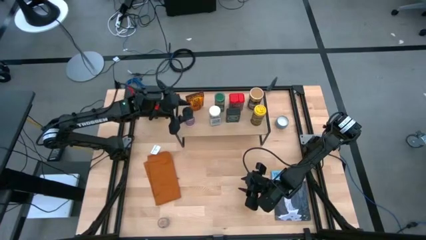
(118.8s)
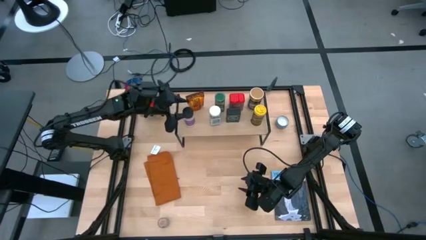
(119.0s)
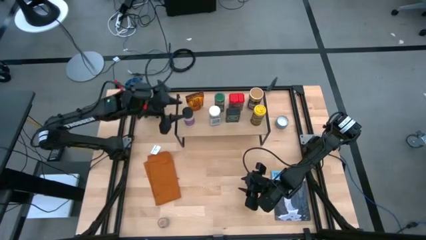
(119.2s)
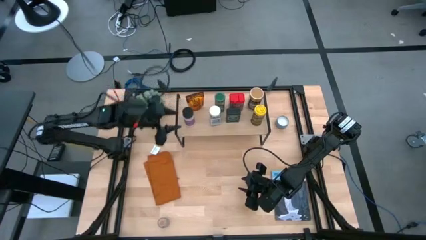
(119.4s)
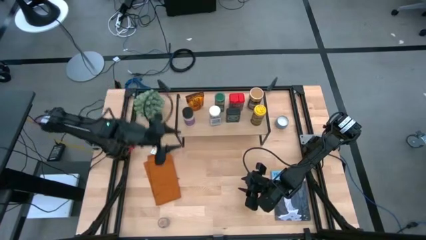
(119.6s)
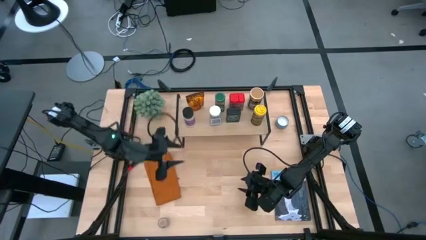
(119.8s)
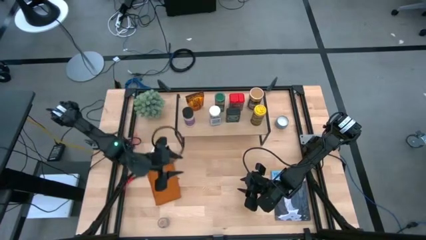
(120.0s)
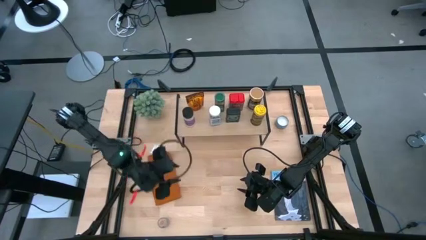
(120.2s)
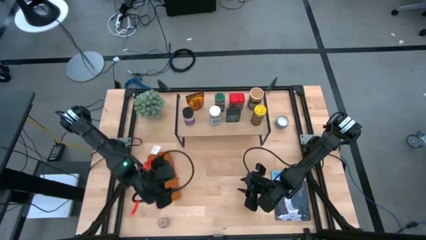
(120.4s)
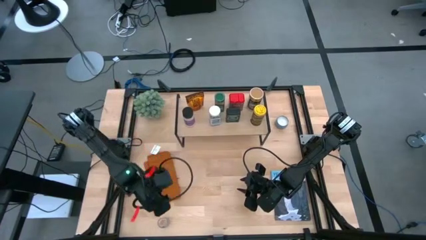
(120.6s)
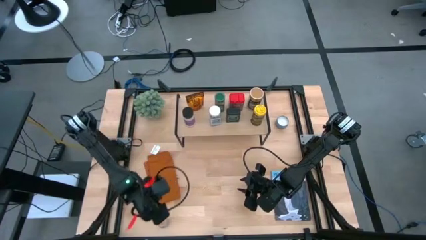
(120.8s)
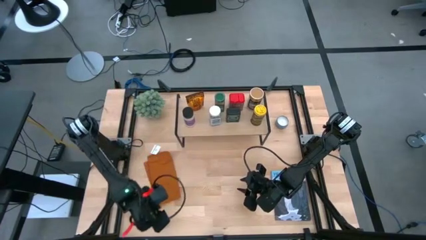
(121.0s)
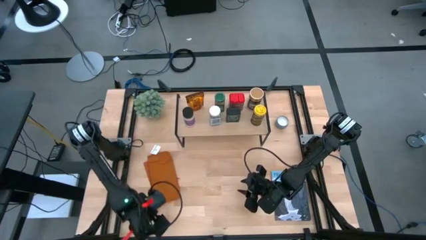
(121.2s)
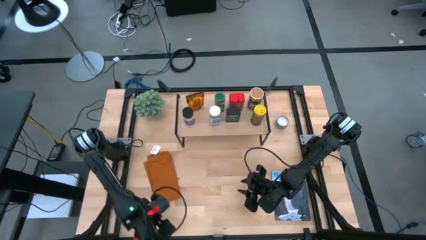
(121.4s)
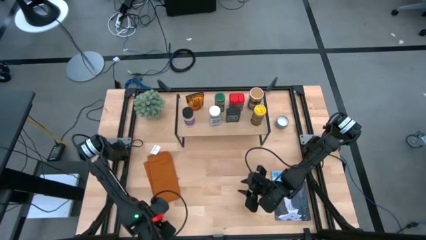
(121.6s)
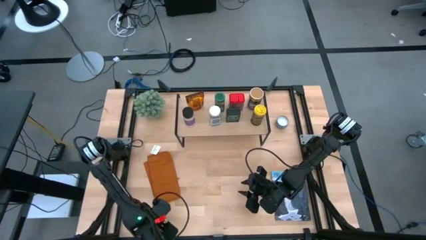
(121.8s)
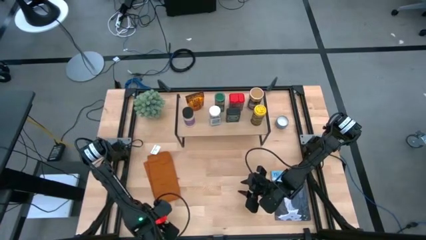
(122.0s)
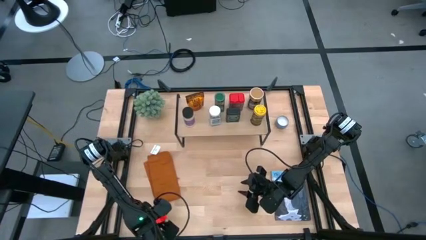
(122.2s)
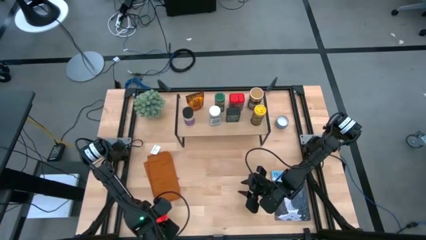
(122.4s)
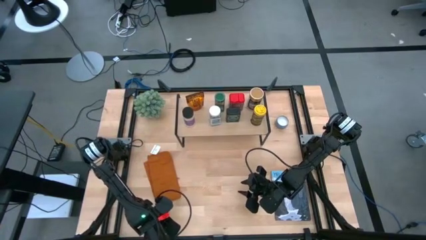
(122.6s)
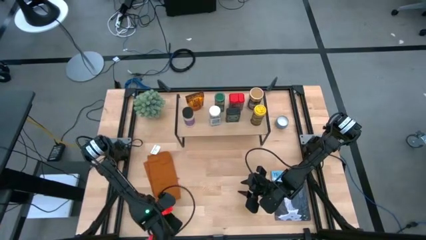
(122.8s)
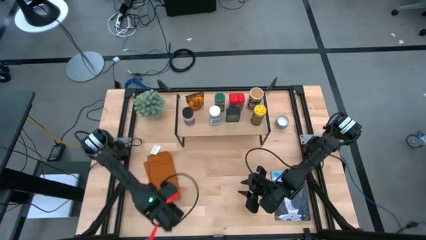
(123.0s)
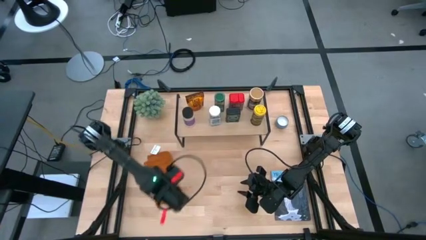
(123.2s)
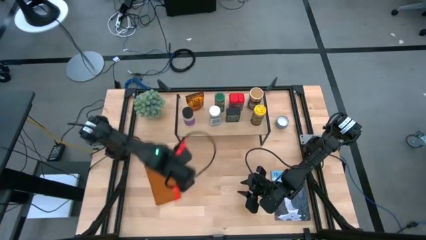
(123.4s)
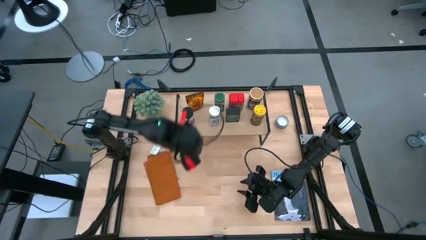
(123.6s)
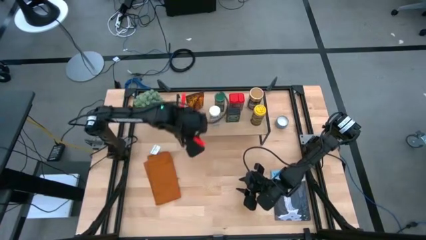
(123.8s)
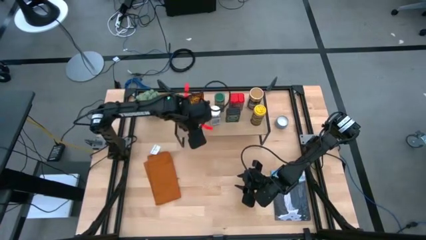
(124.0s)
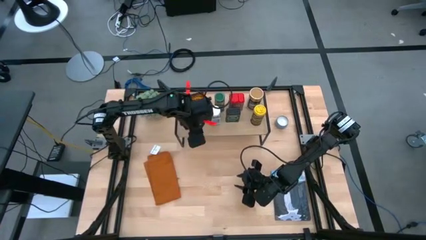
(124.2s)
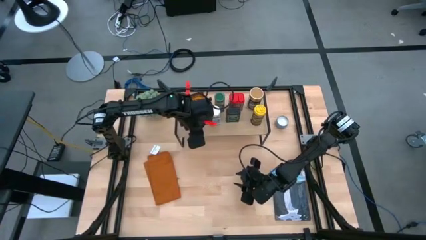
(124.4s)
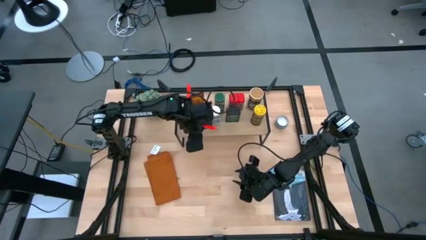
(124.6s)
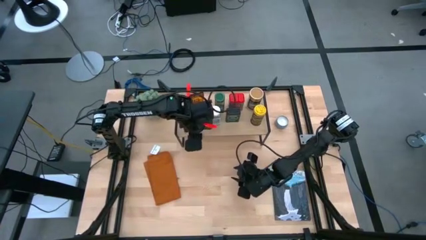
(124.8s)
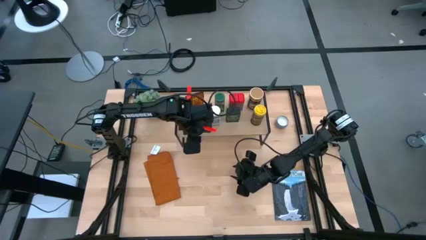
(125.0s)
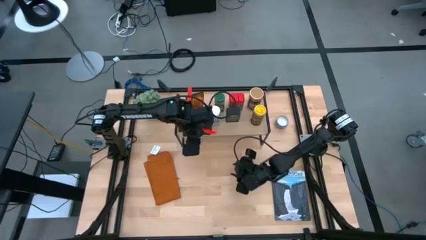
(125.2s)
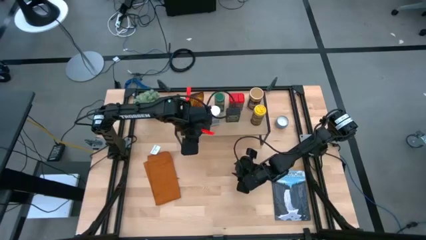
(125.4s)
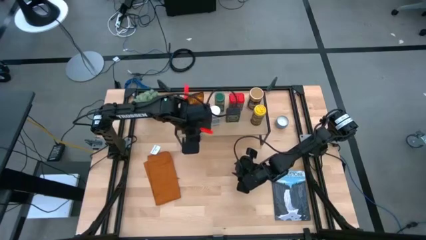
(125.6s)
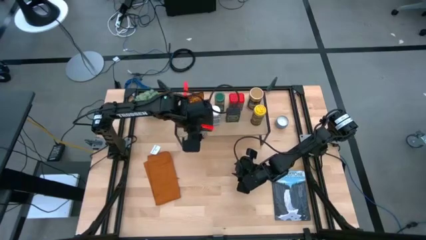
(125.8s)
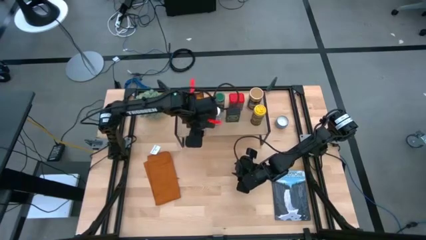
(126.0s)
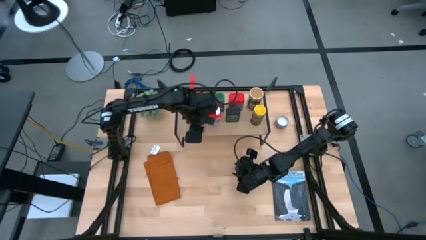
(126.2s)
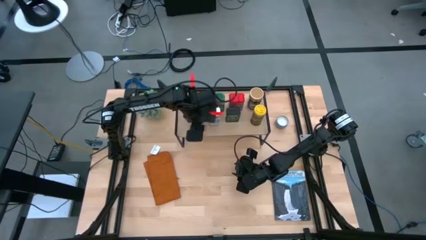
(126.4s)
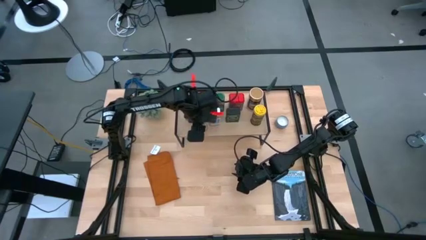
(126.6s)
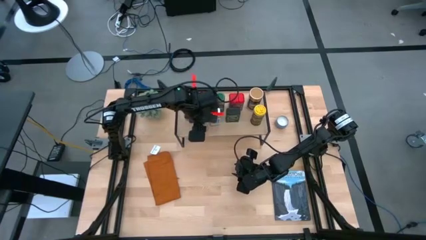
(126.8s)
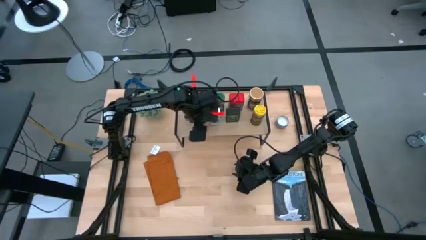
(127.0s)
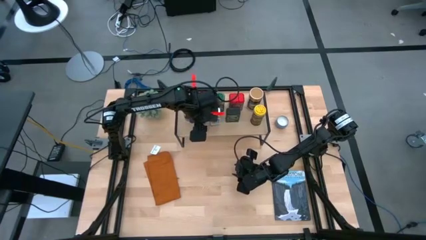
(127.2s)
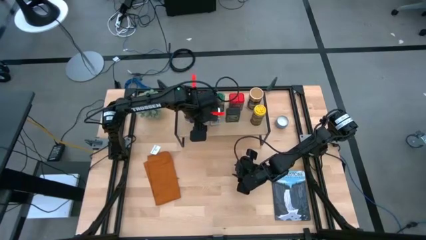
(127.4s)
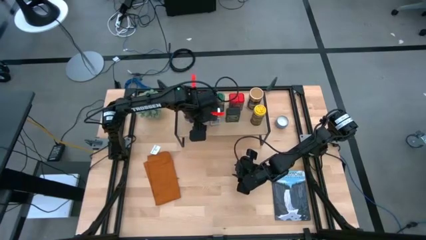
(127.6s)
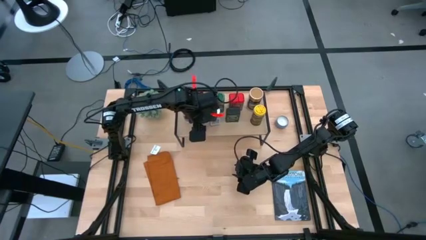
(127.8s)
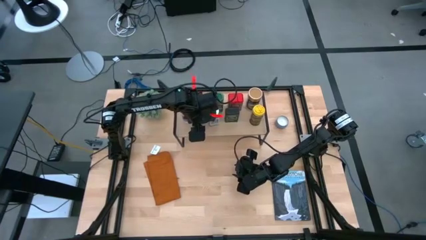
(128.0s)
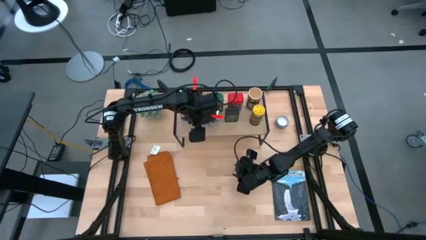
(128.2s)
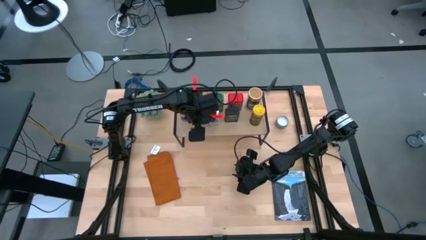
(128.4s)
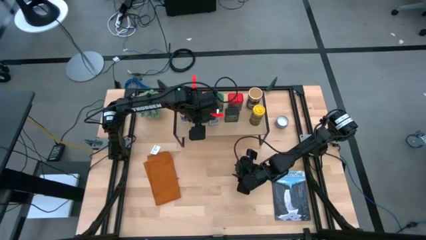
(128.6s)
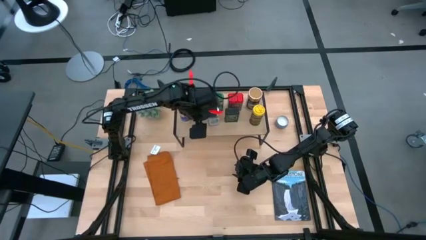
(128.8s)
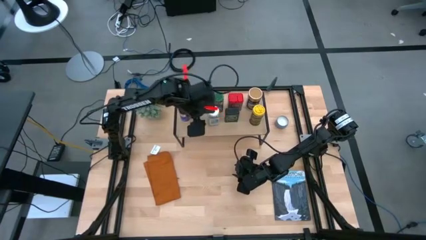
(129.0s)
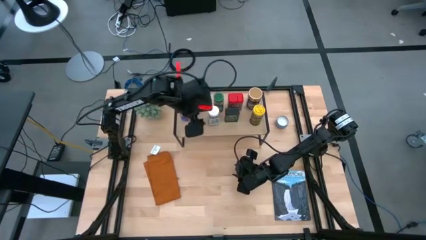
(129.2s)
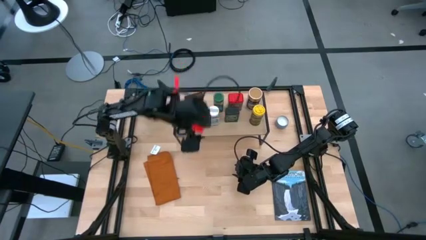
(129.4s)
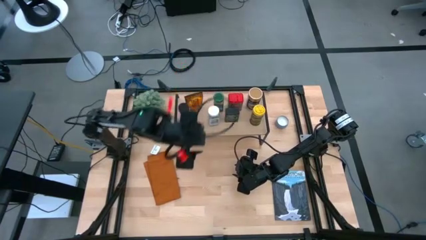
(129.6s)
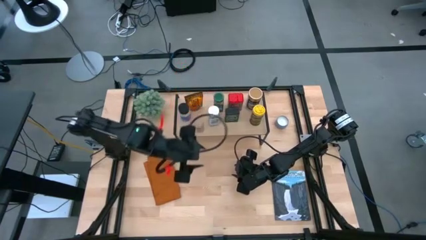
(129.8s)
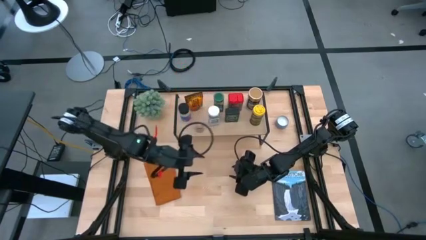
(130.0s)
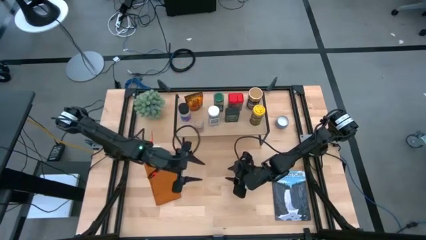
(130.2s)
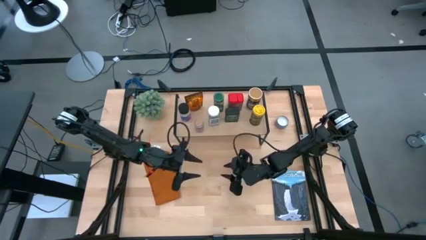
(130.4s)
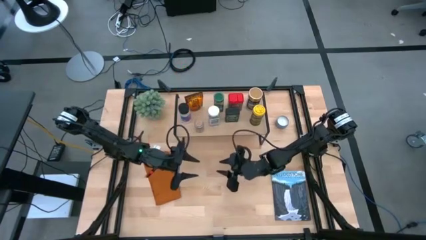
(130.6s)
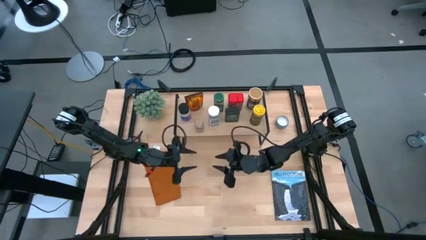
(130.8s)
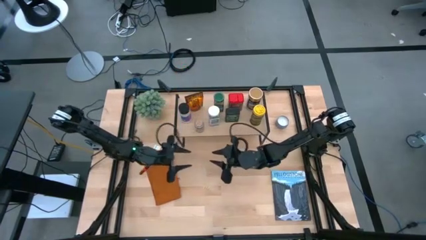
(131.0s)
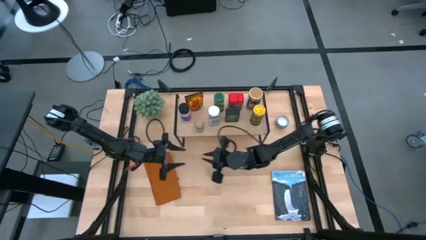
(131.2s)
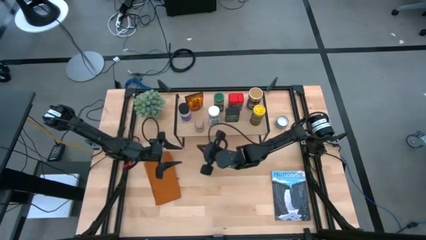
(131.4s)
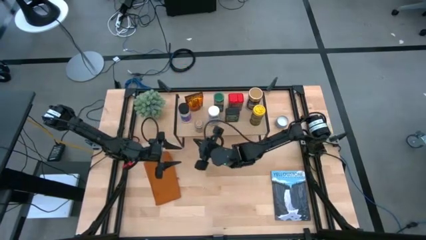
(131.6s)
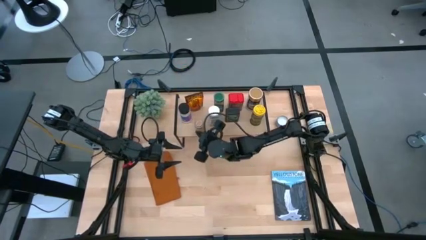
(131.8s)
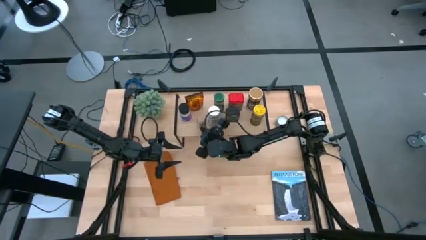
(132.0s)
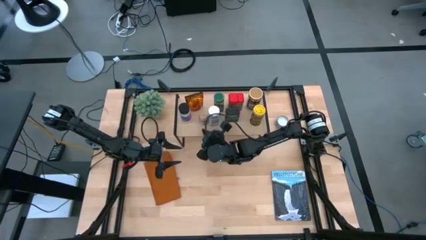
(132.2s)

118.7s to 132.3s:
Task: Shelf spices
Put the brown seasoning bottle on the shelf

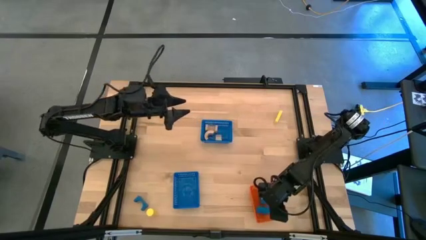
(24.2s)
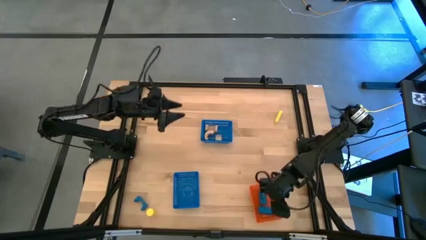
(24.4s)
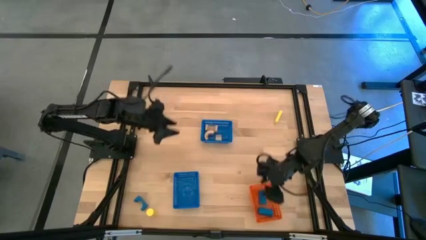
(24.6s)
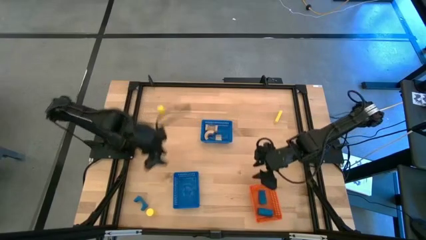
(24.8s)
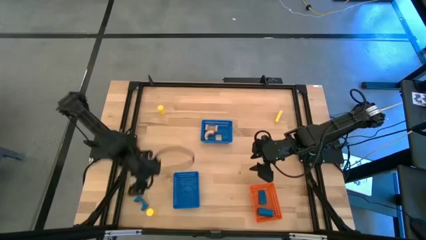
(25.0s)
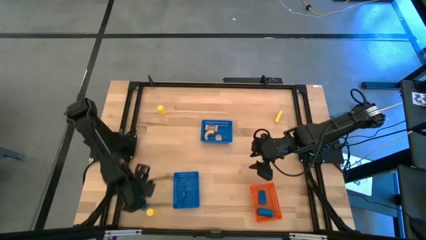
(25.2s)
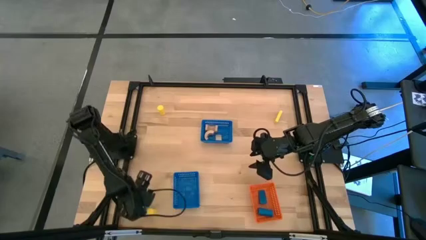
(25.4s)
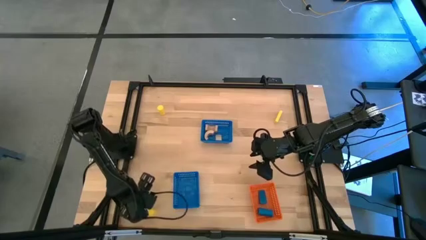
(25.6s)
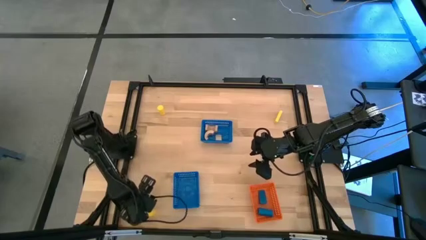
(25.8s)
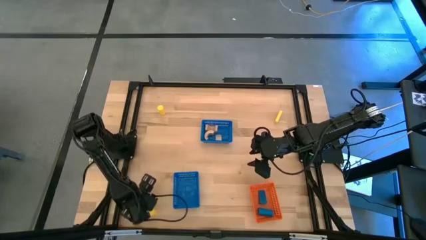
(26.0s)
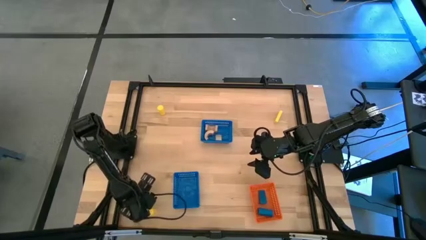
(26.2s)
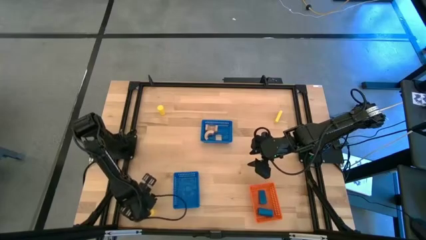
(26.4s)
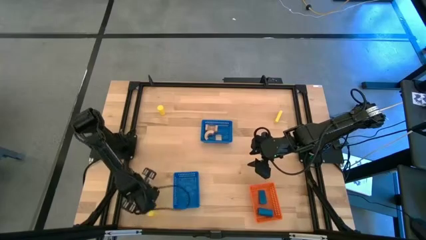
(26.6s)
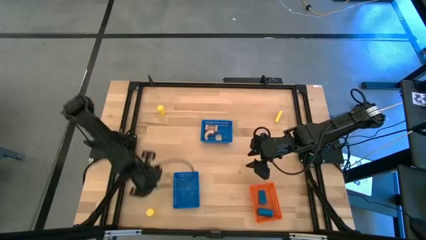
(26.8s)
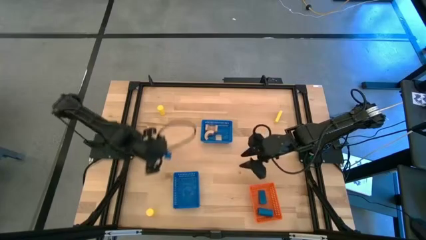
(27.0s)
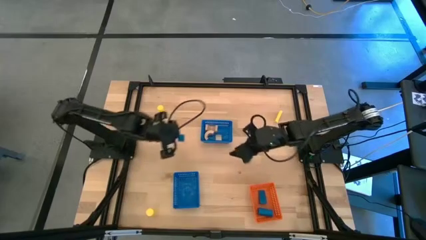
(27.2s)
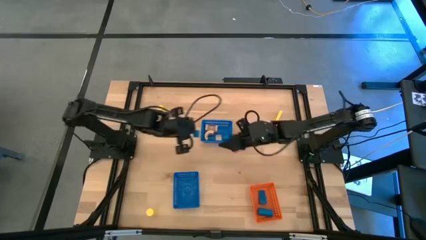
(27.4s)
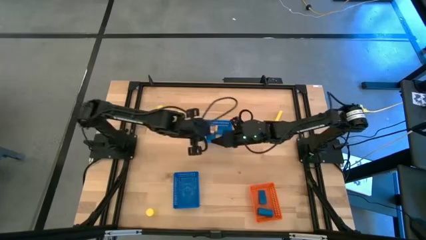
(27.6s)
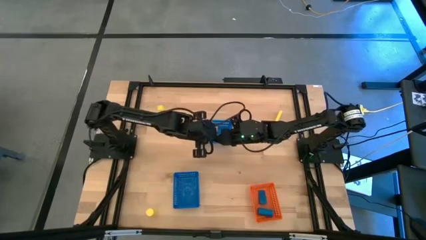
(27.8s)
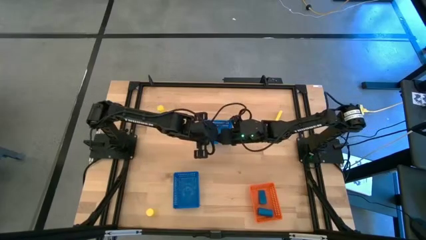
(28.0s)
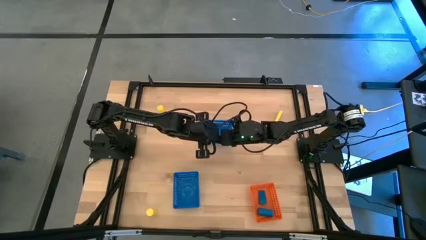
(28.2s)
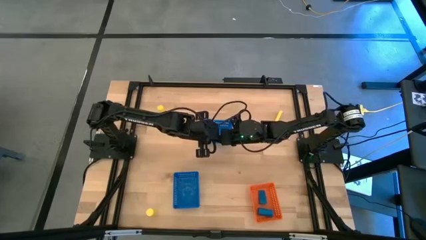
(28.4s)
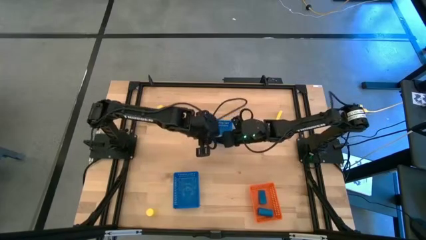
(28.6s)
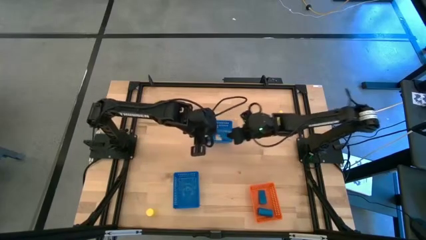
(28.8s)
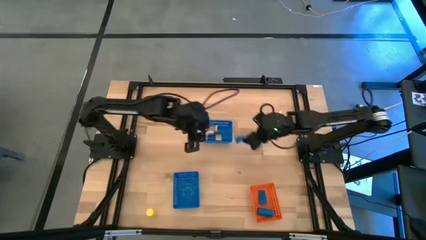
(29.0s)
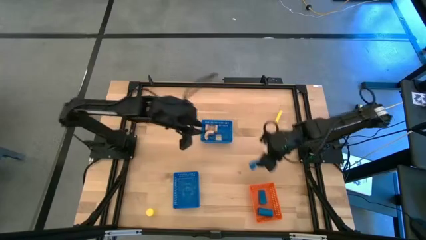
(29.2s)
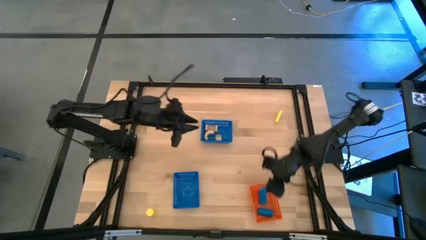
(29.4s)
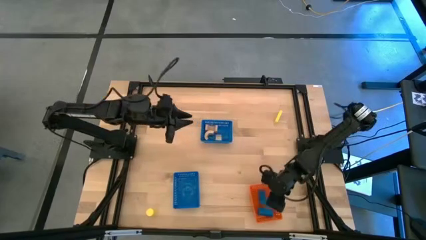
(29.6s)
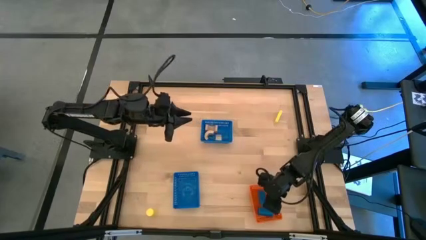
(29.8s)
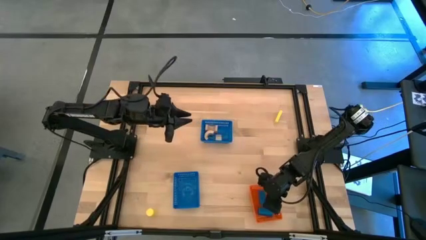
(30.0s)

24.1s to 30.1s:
Task: Sort & place blocks by color
Put the blue block into the orange basket
